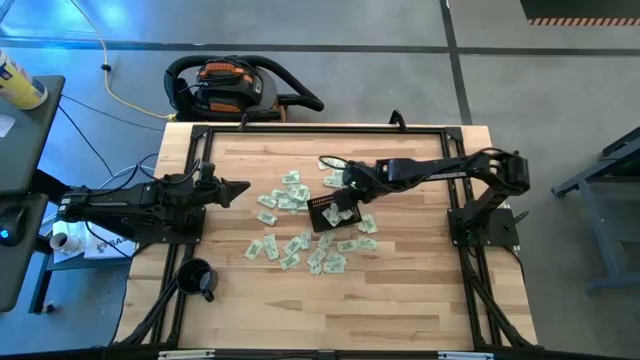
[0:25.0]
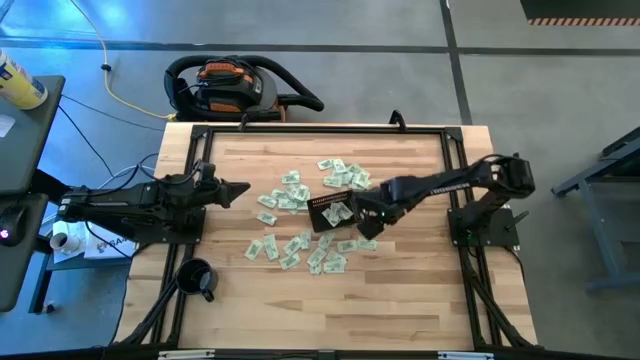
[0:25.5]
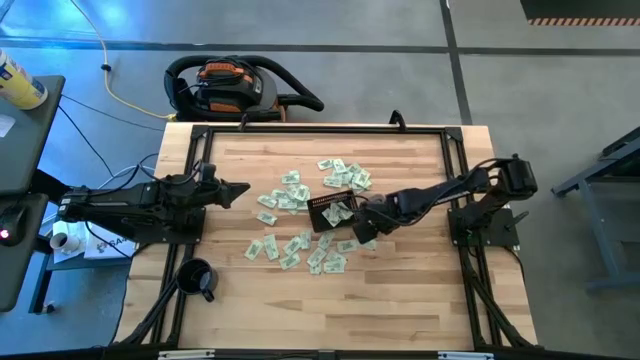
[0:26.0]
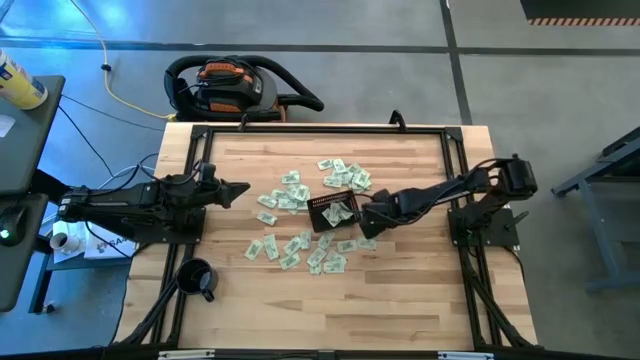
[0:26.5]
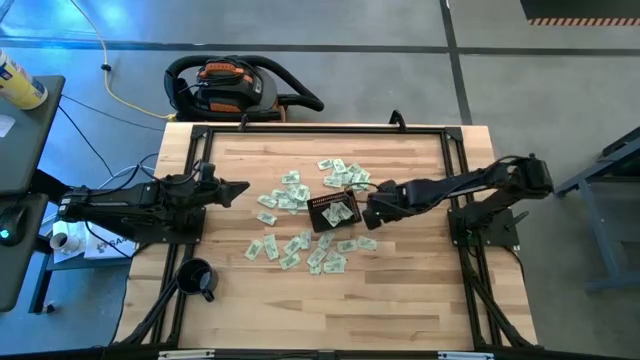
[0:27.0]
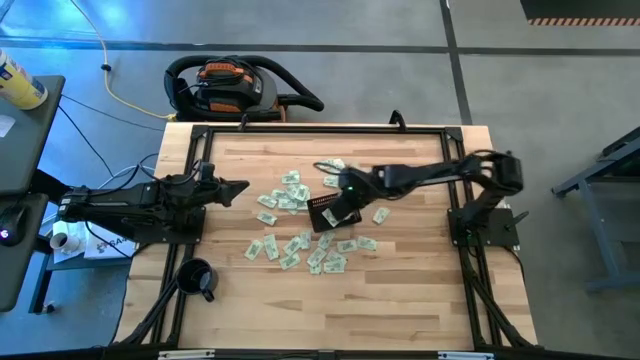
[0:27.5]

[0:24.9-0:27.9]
Task: Pick and place Stevia / Truvia into bins
Put the green stevia packet into the black bin

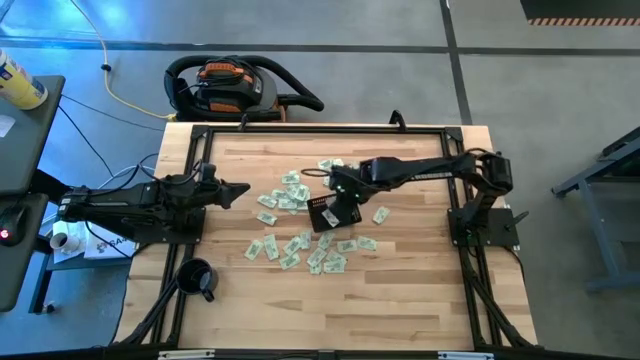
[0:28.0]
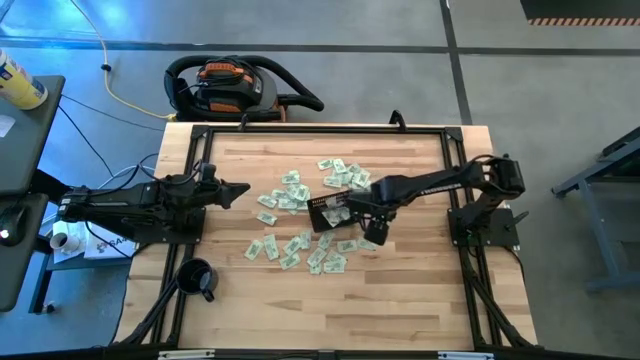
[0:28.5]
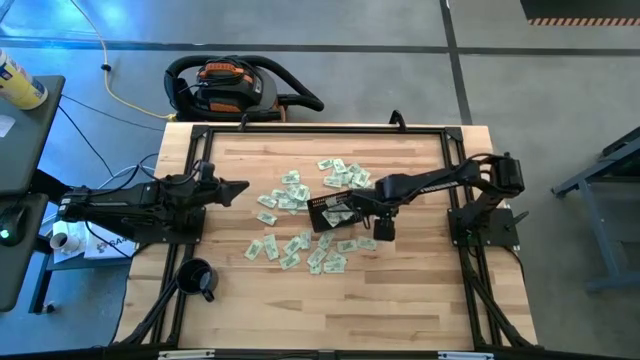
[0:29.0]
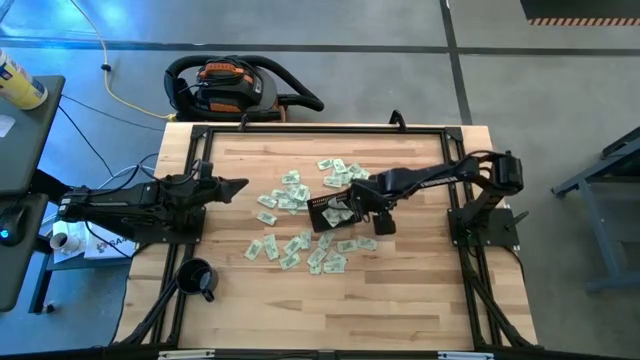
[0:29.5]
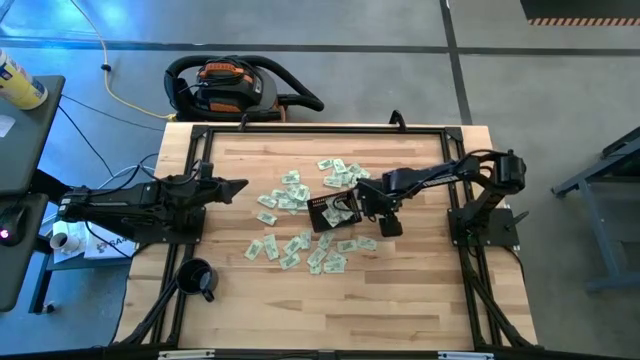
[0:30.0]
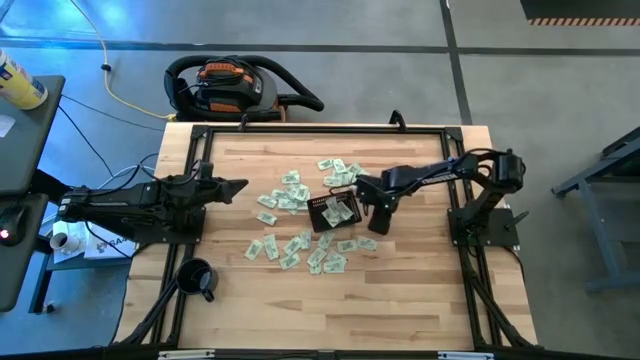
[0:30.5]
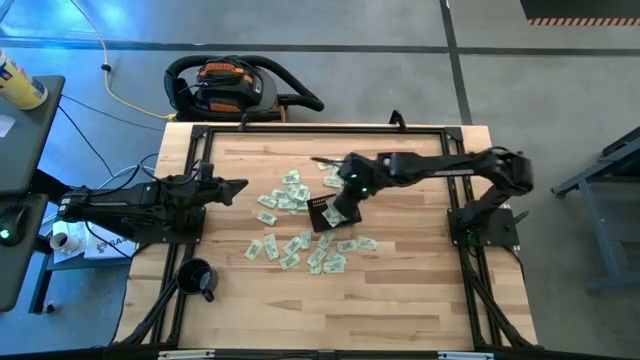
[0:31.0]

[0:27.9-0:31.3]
Put the green stevia packet into the black bin

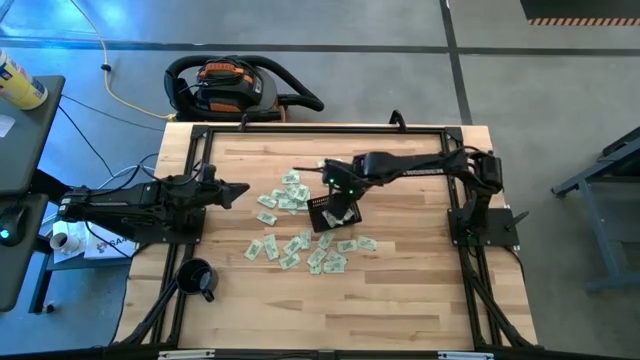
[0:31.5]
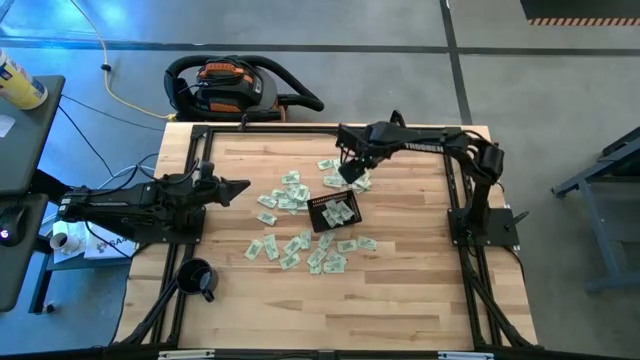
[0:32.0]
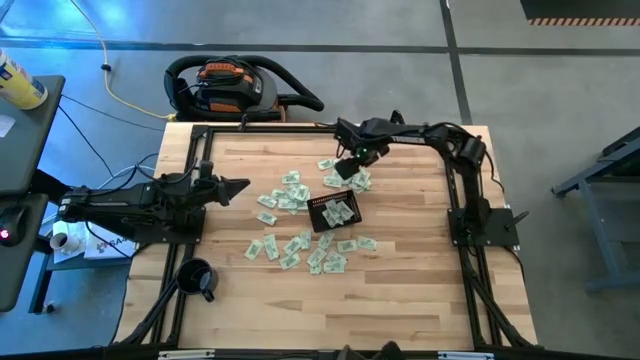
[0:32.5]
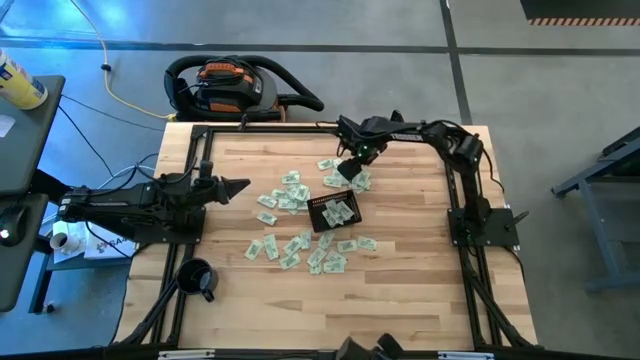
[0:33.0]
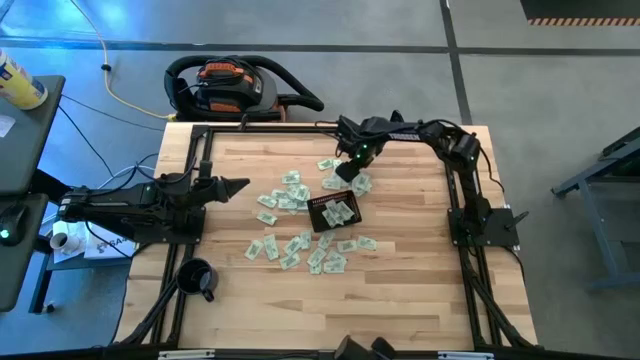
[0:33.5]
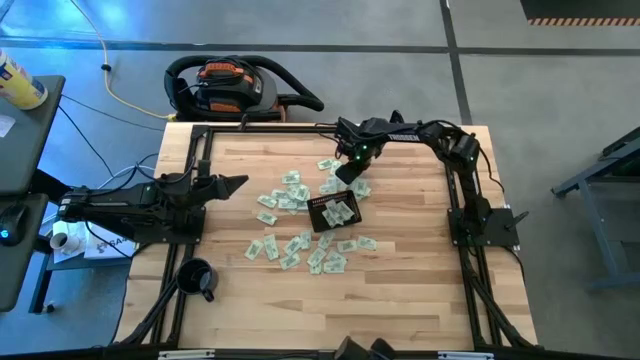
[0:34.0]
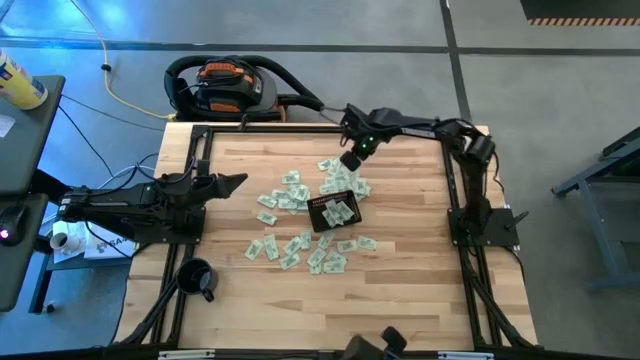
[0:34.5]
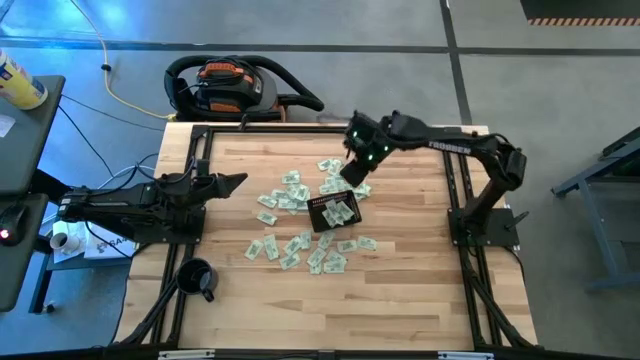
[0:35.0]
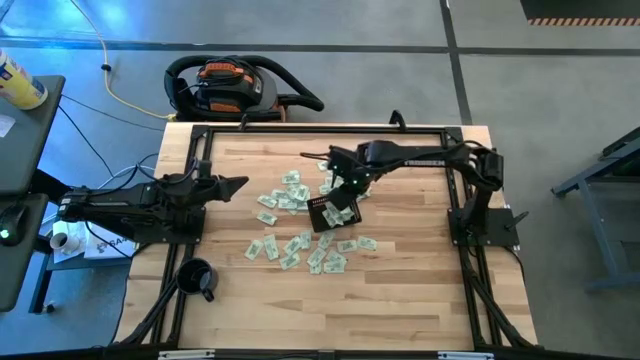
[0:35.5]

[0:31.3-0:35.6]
Put the green stevia packet into the black bin

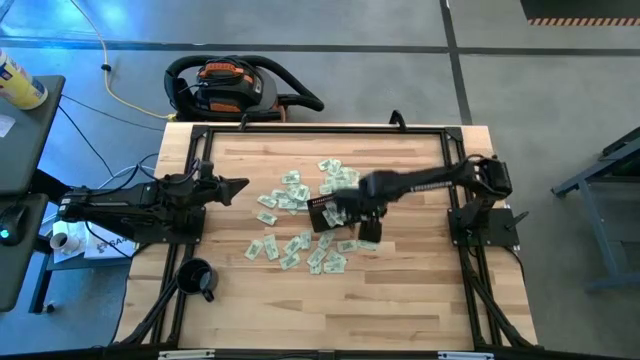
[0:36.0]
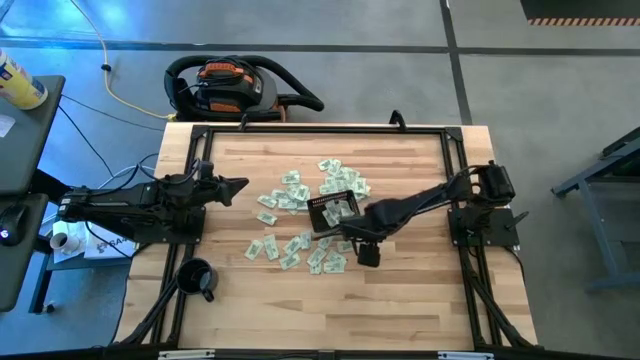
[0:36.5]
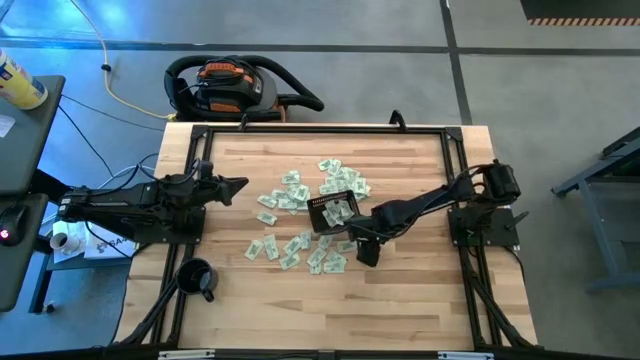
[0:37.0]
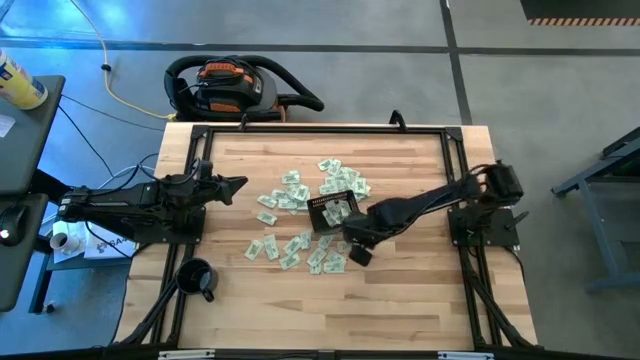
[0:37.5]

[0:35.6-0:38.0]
Put the green stevia packet into the black bin

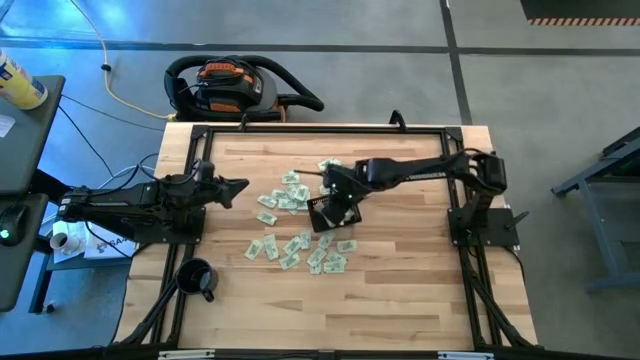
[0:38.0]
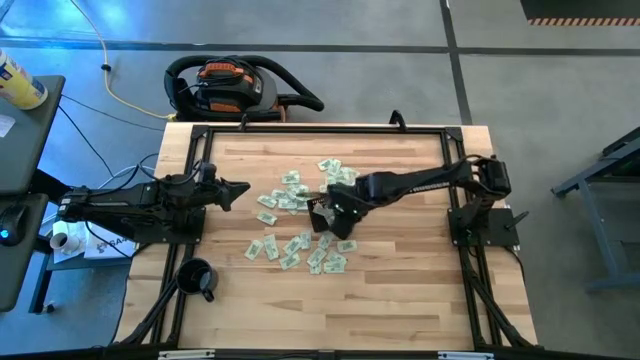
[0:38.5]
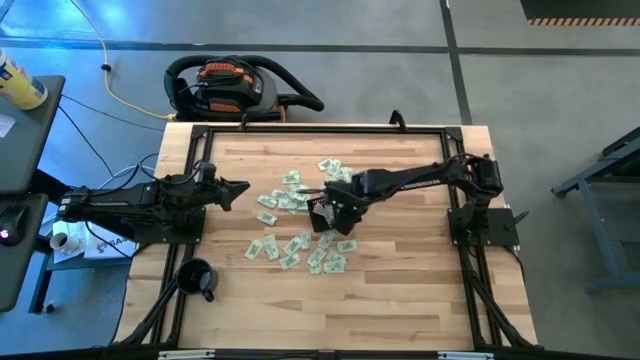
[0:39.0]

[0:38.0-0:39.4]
Adjust the black bin

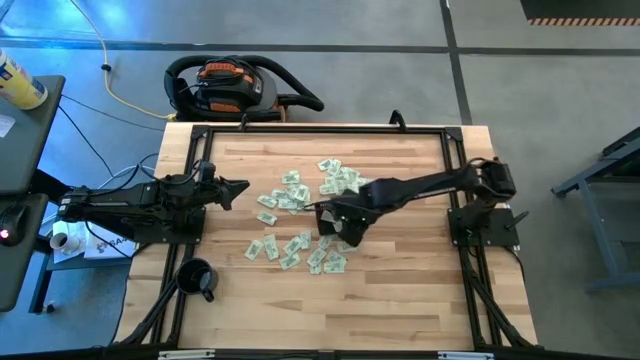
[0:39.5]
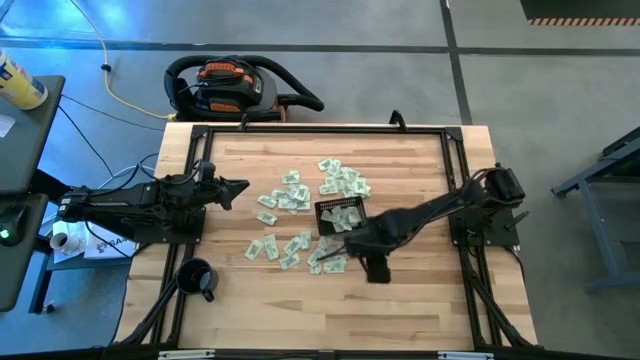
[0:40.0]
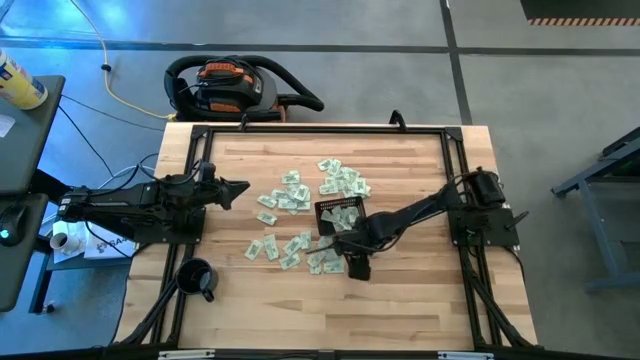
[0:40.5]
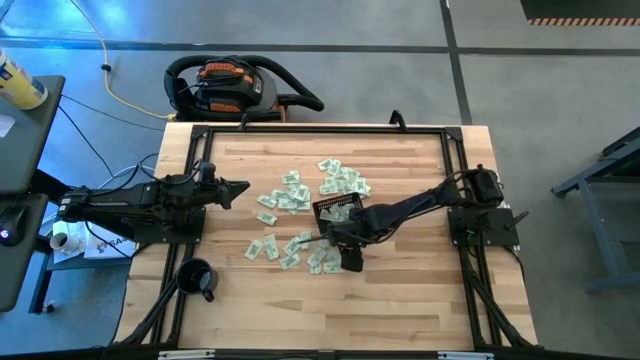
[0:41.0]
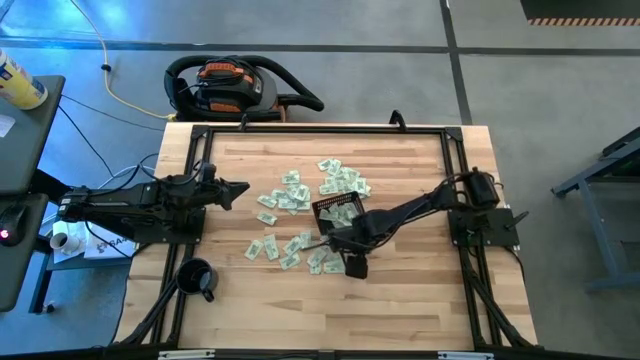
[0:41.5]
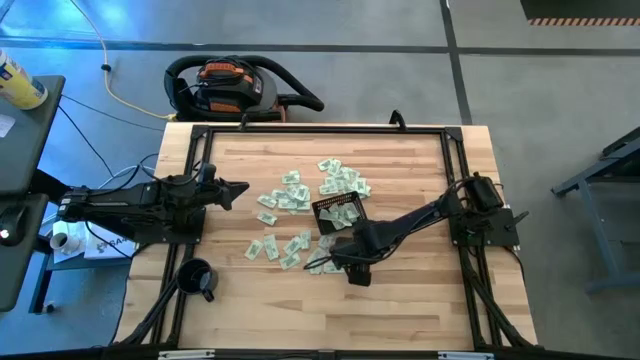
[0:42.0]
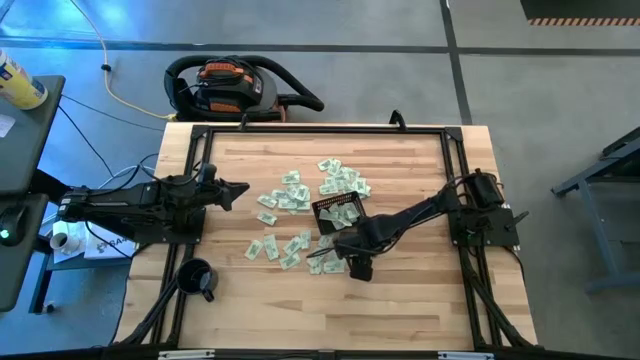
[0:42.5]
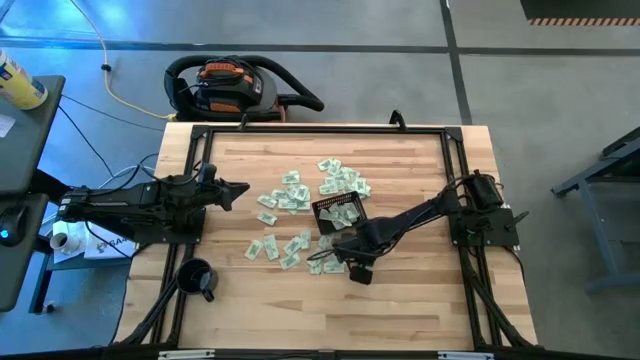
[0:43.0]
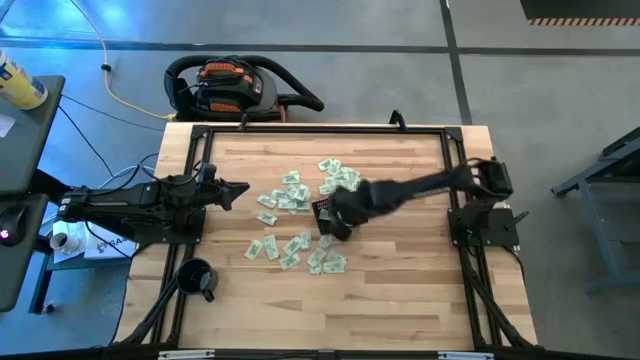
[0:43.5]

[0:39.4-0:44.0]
Put the green stevia packet into the black bin

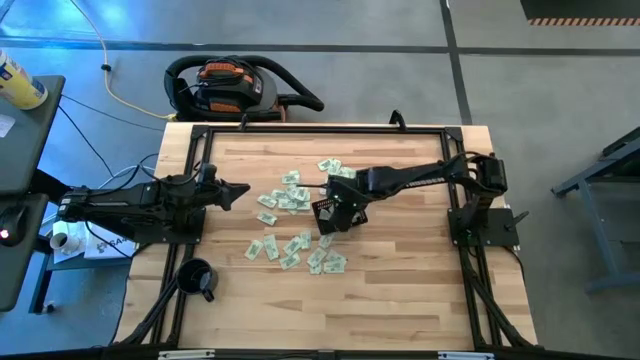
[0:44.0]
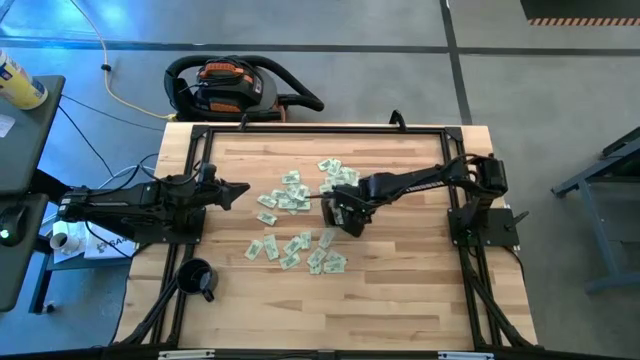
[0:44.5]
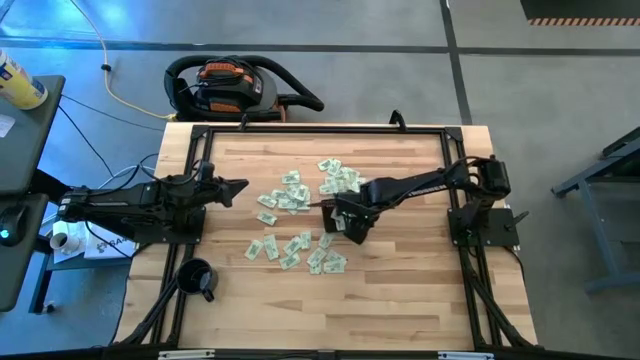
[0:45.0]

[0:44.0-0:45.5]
Adjust the black bin

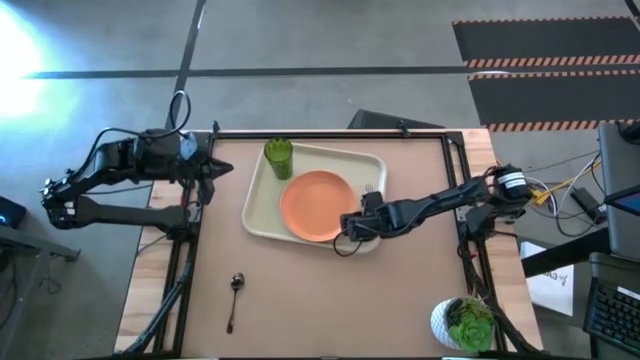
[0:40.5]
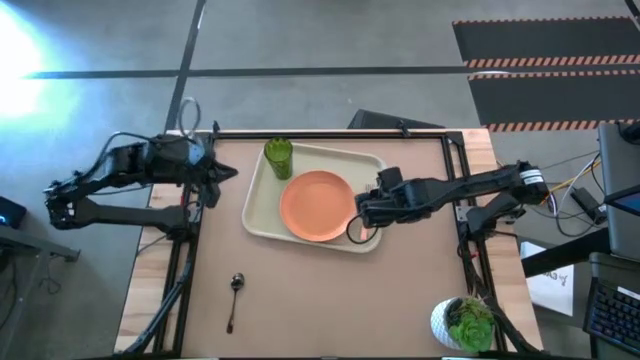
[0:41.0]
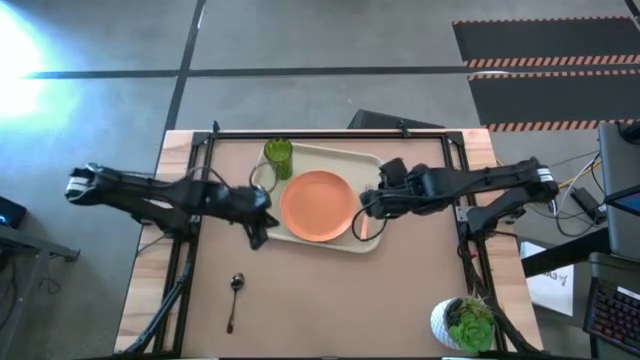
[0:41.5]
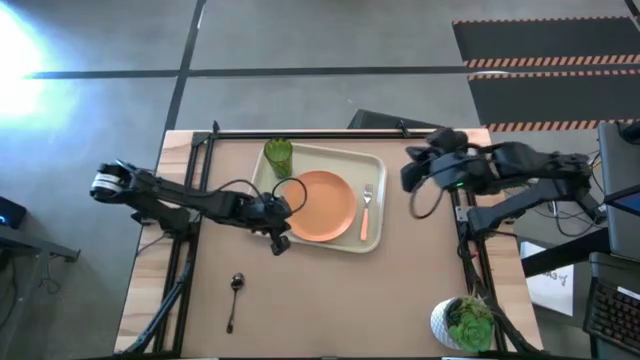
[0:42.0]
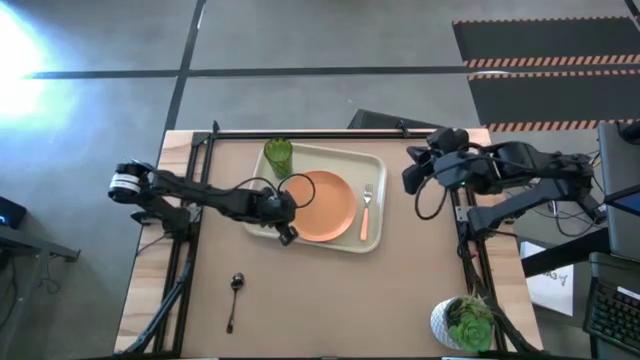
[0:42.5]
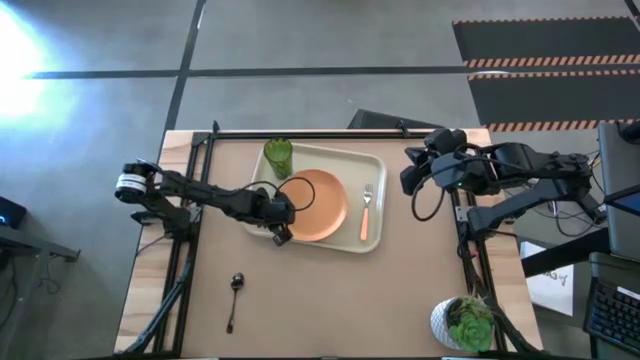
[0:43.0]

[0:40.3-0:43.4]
Task: Pick and place plate/cup/fork/spoon on tray
Adjust the orange plate on the light brown serving tray
